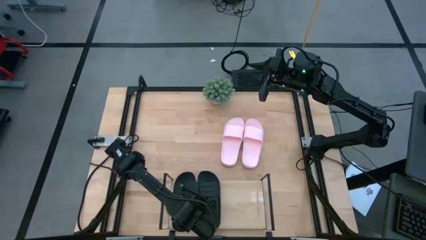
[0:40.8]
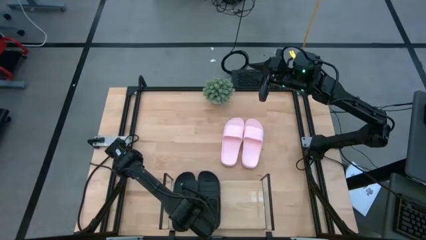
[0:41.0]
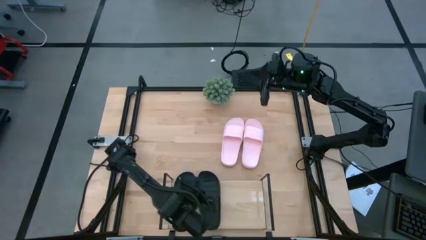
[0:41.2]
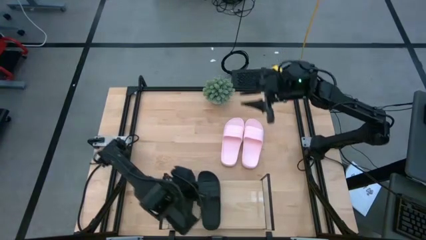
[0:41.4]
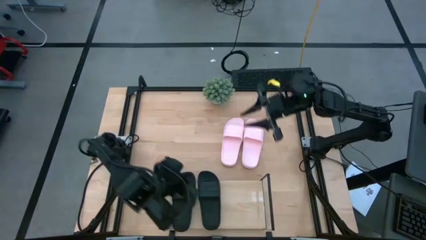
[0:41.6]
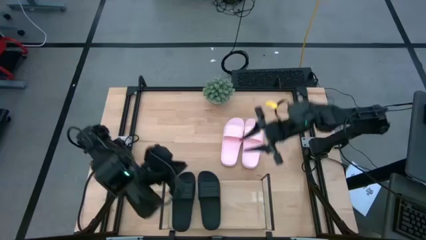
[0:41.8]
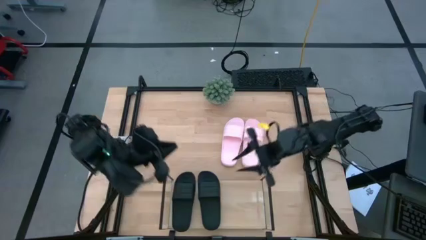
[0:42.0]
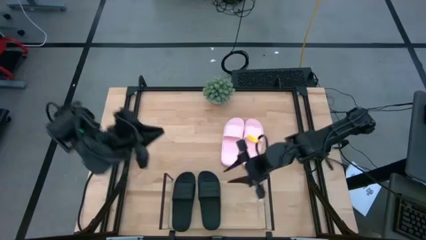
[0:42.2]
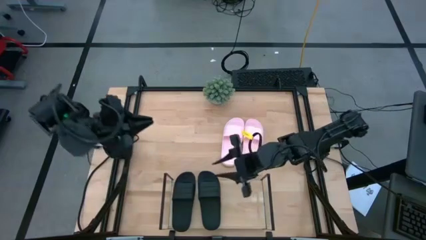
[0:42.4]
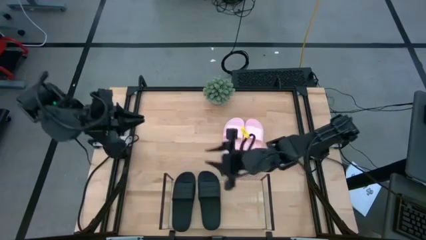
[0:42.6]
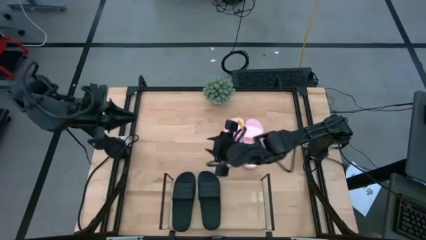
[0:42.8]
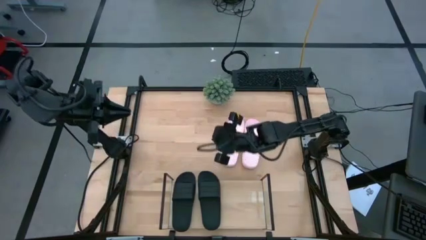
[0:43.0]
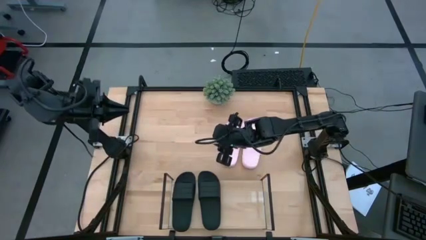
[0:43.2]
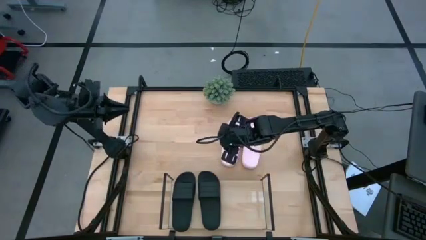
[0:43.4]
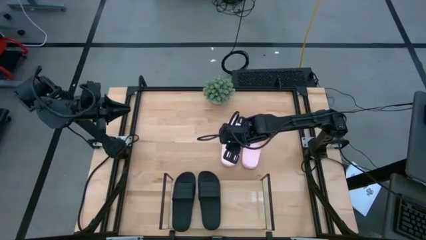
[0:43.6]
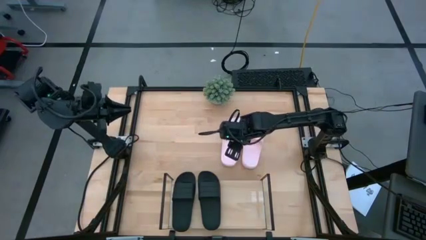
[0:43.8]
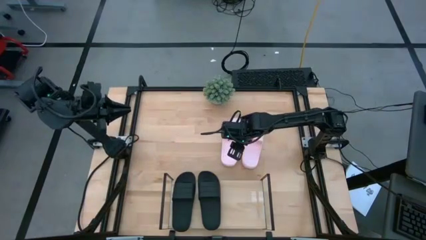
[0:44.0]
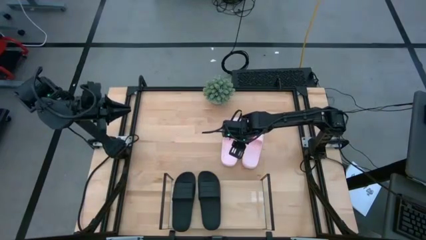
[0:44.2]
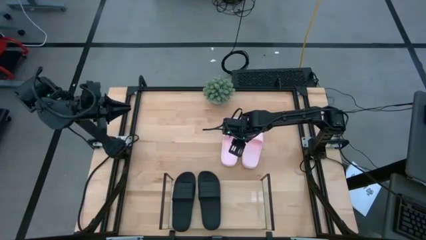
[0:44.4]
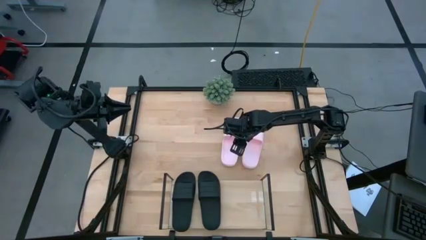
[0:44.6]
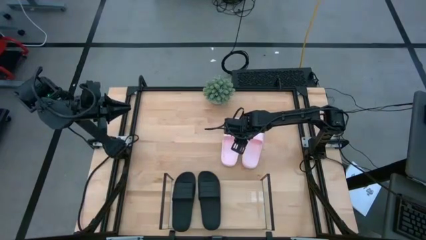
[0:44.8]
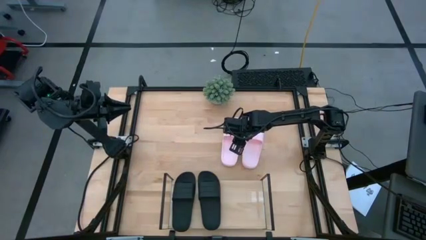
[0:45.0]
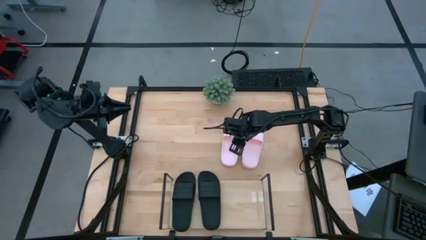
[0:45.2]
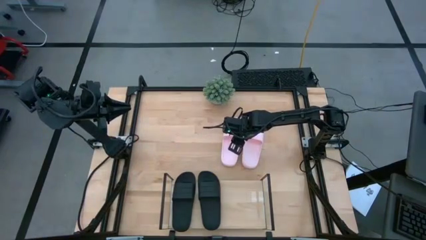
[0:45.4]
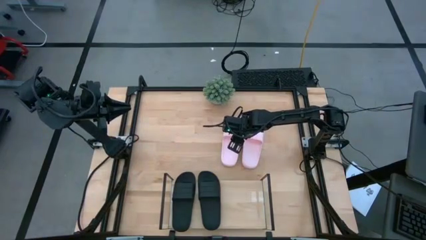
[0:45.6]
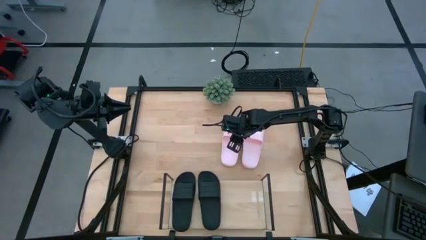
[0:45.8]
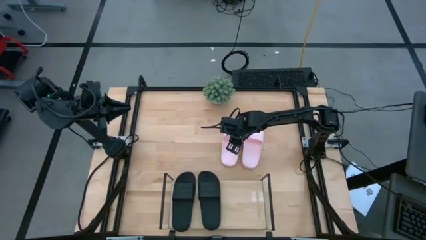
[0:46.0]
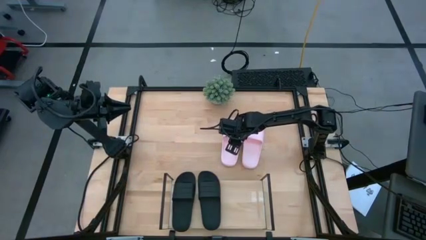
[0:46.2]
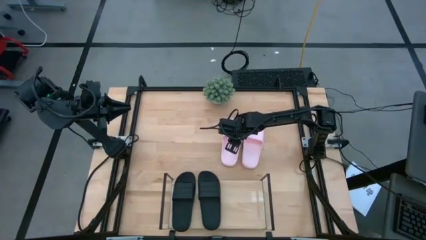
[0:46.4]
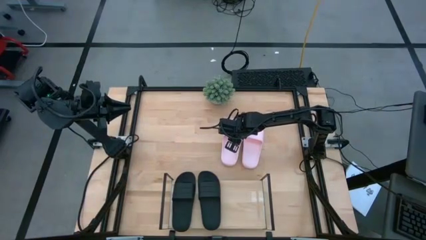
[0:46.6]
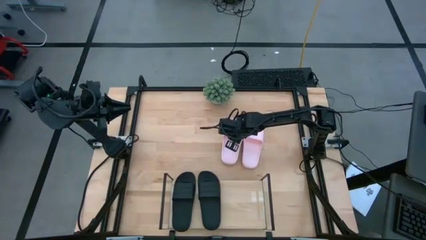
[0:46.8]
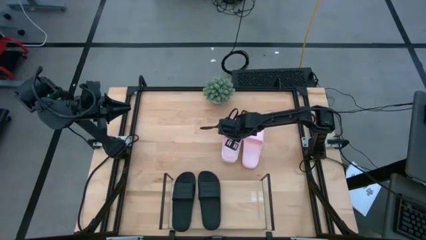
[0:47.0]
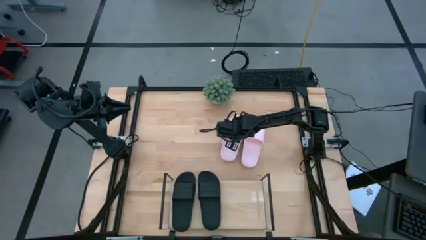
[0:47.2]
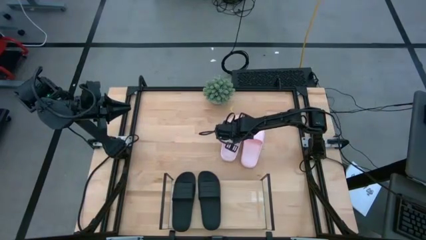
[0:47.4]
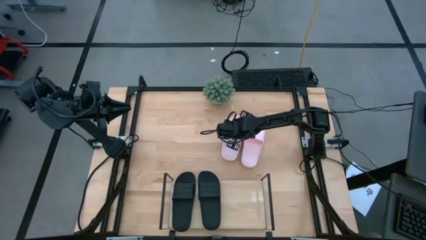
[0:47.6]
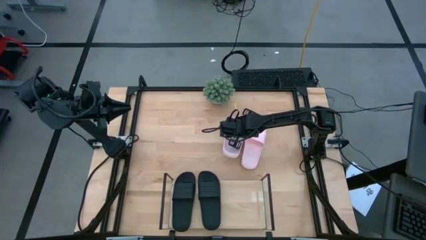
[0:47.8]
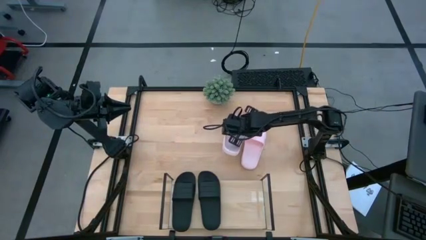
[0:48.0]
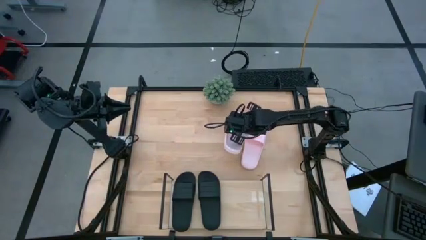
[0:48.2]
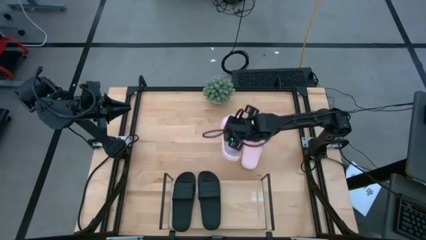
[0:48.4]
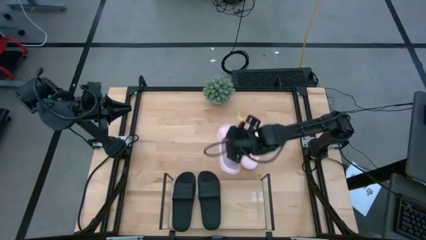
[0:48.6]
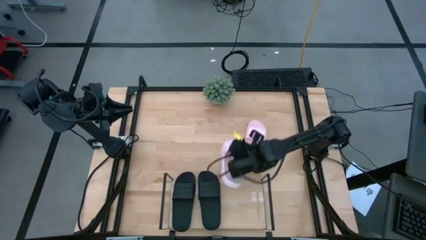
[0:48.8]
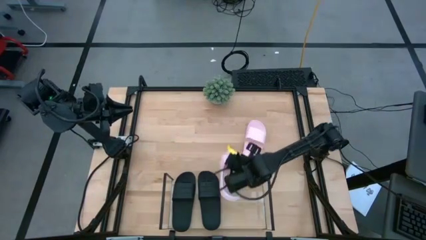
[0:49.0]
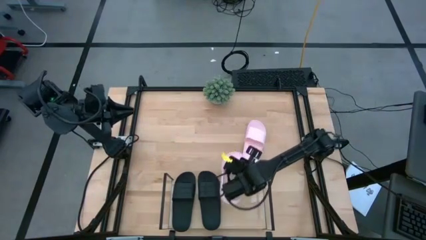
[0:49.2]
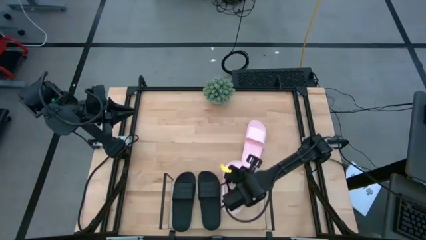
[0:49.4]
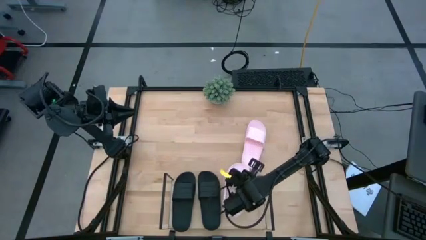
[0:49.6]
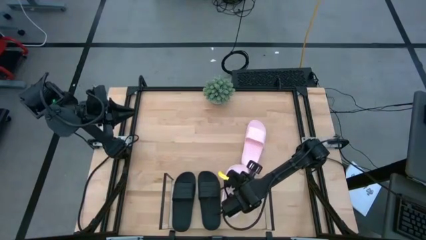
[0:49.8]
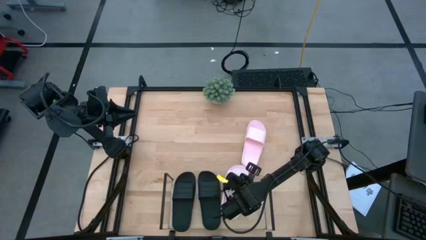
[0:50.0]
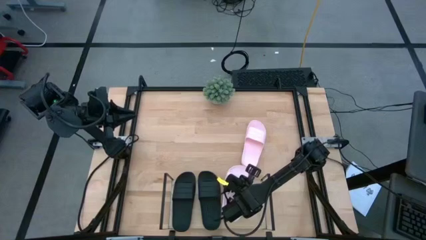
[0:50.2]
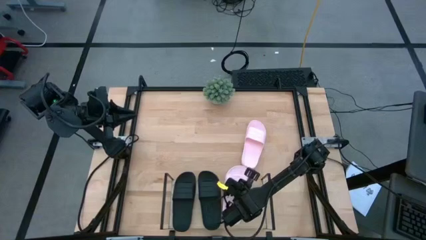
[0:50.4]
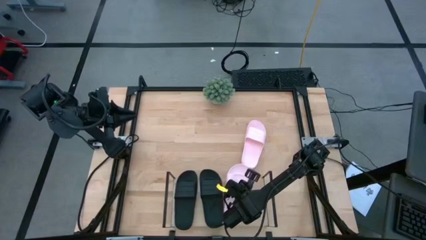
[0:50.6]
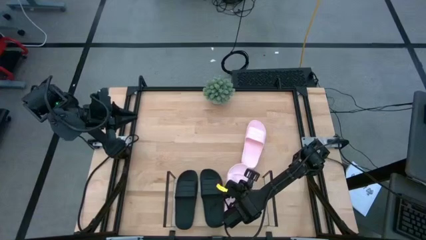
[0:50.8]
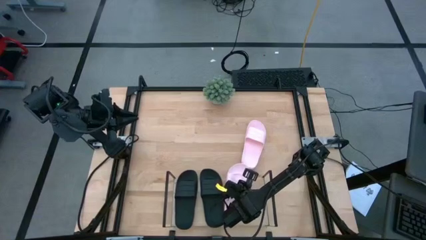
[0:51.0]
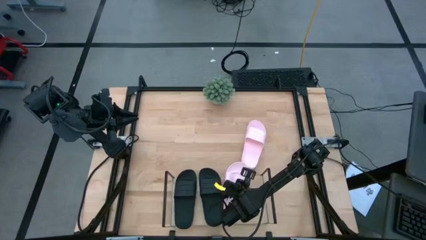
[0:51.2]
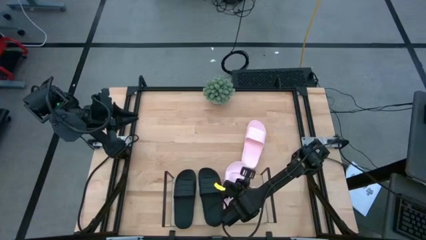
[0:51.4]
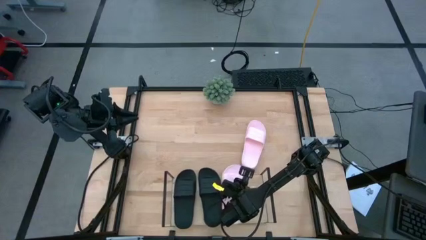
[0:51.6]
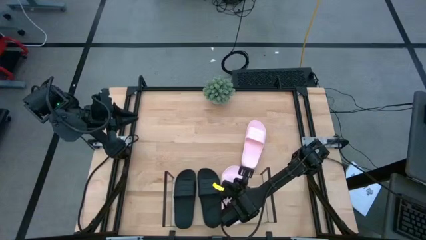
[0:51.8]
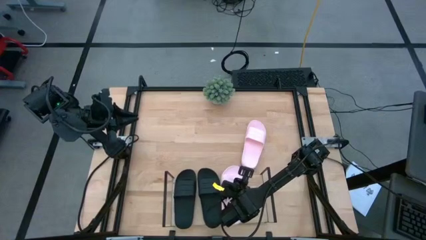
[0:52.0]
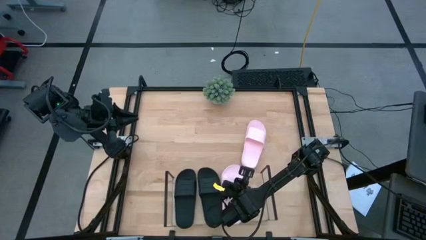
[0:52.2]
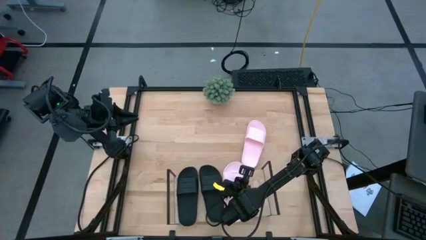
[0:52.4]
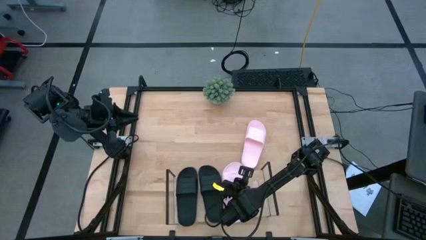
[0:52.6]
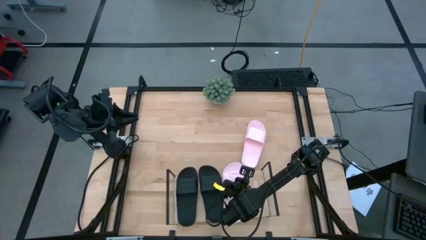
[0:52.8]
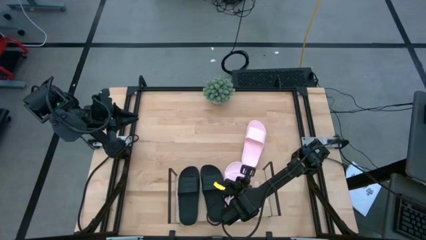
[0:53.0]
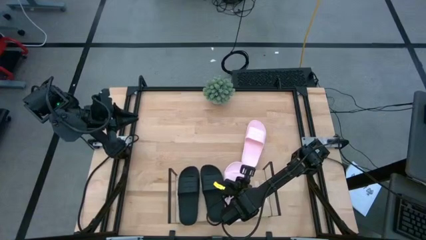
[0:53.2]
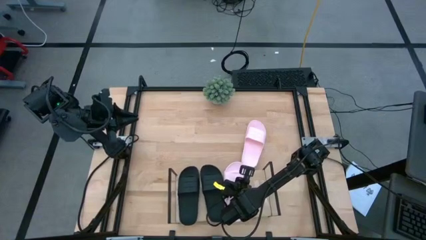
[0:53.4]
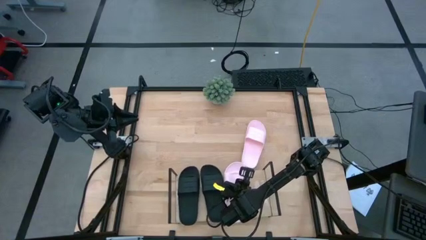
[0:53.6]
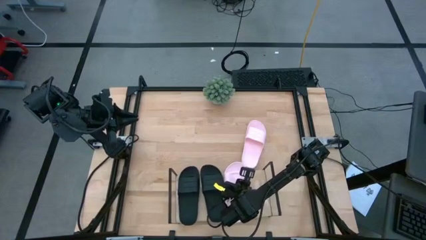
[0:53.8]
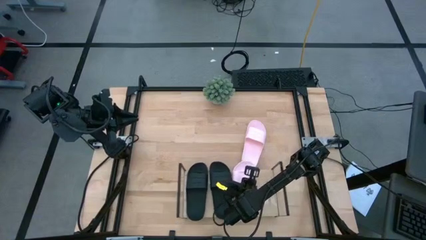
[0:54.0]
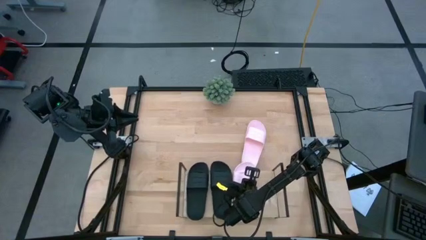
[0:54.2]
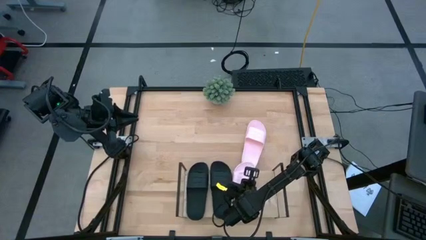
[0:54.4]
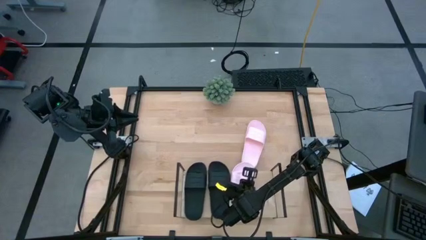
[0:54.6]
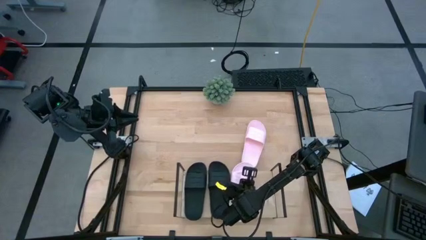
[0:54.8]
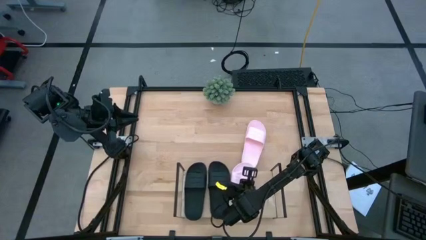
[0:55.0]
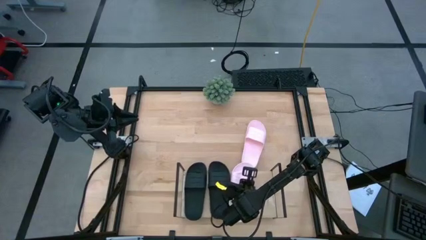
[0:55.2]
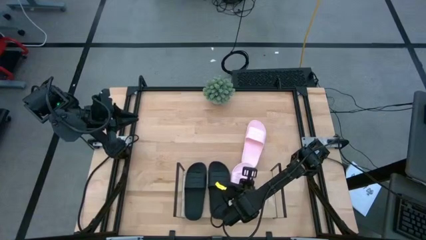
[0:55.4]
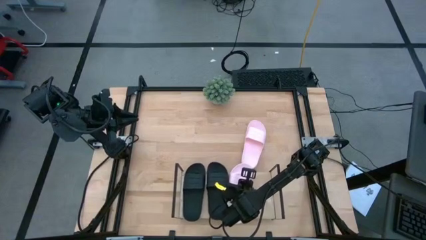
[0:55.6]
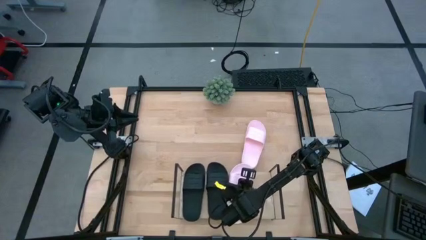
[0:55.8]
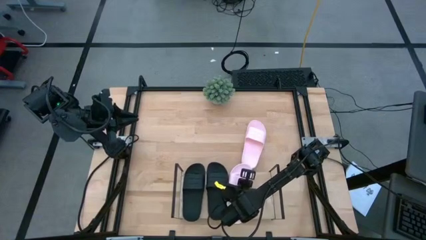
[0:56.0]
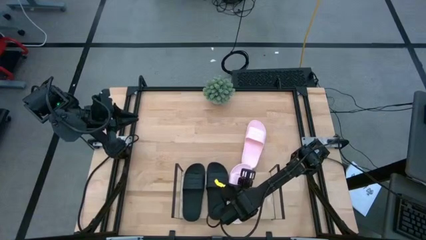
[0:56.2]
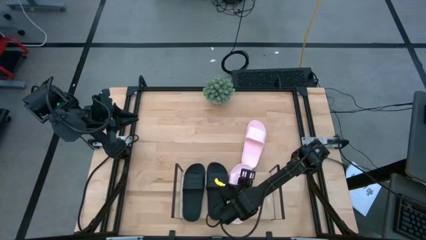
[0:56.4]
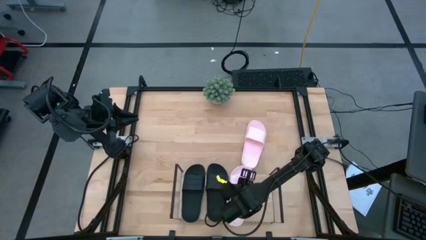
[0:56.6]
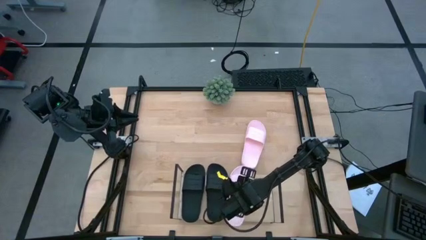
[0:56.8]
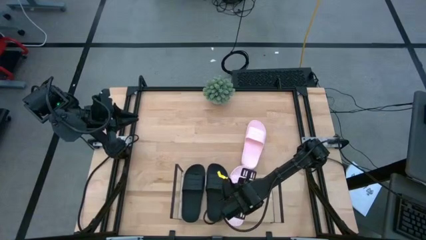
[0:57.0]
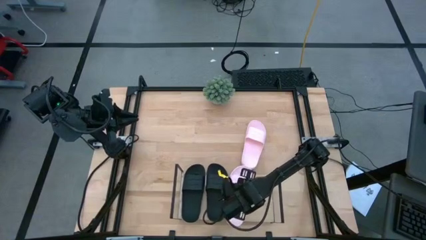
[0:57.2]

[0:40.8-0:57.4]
Task: Pick and place slides into the shelf
Put the left pink slide on the shelf
